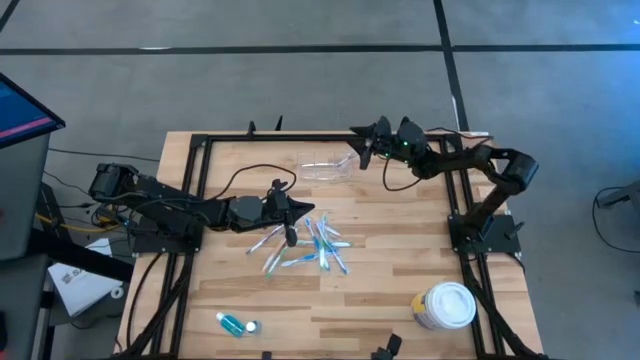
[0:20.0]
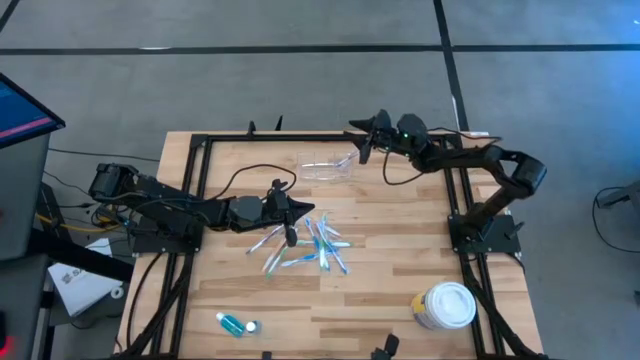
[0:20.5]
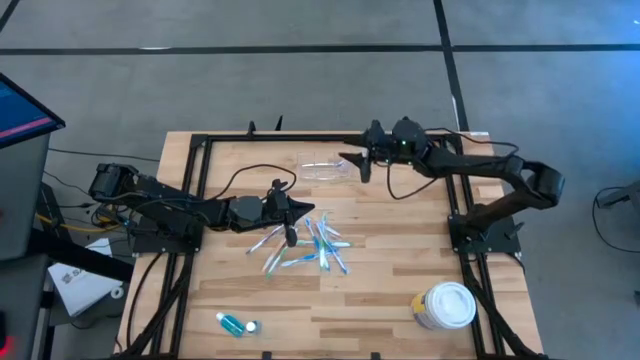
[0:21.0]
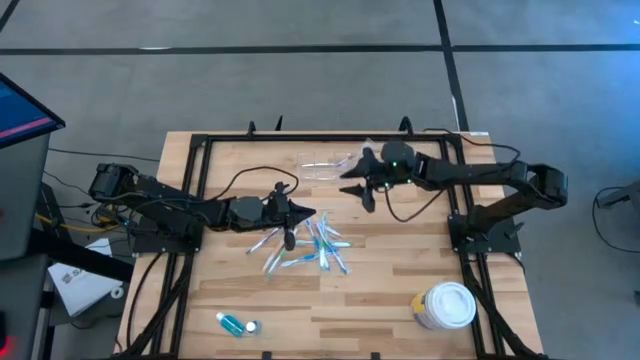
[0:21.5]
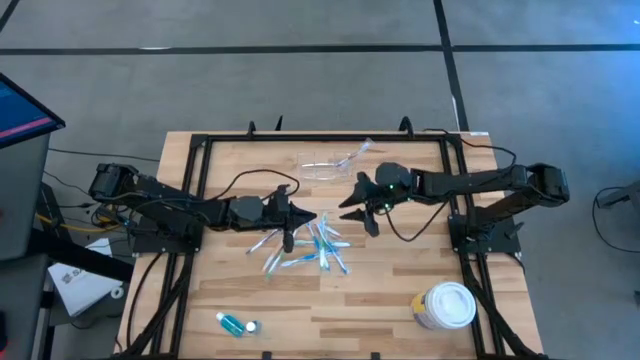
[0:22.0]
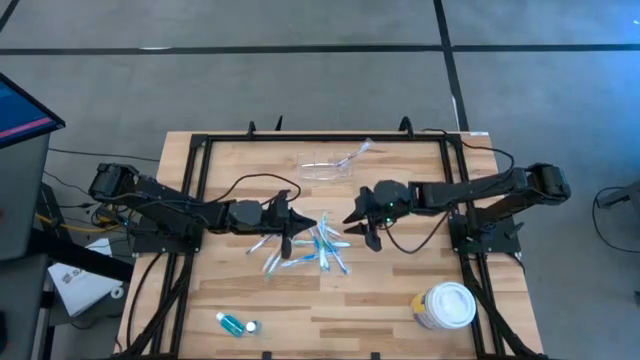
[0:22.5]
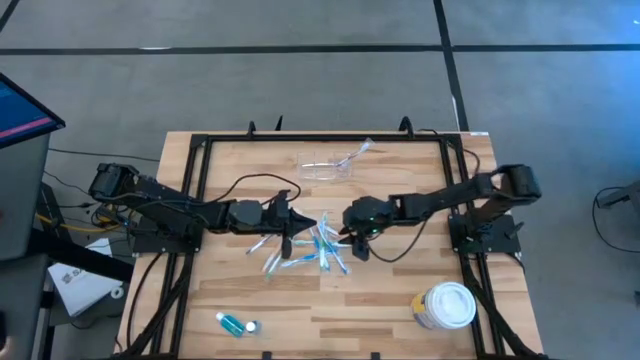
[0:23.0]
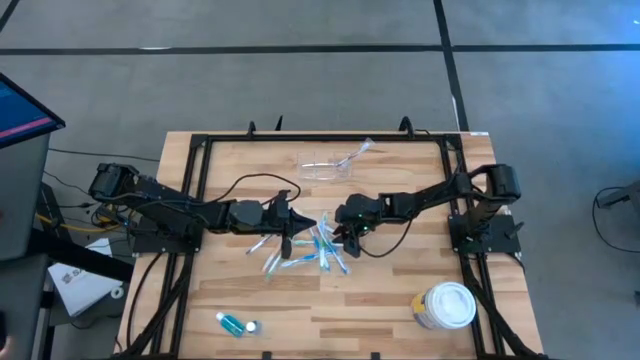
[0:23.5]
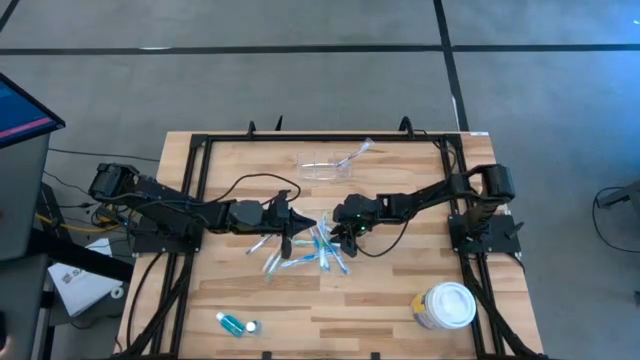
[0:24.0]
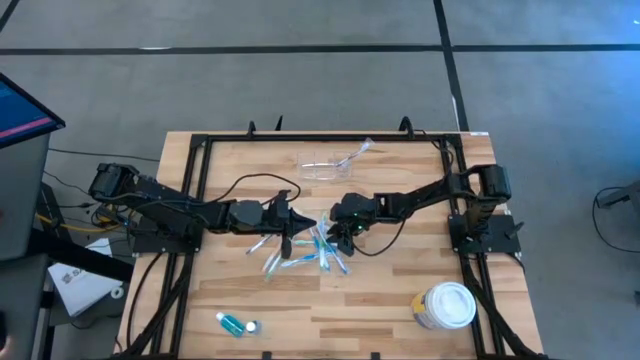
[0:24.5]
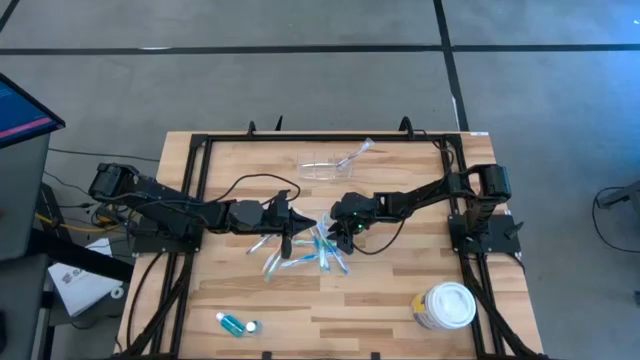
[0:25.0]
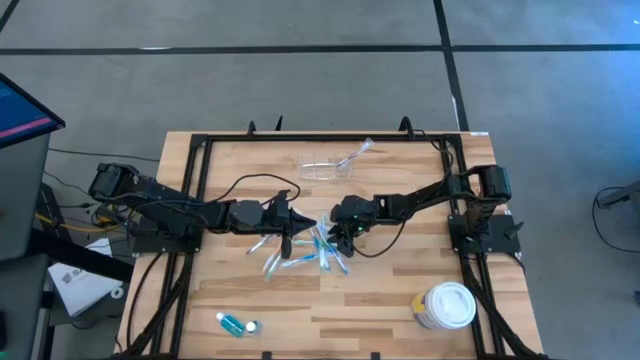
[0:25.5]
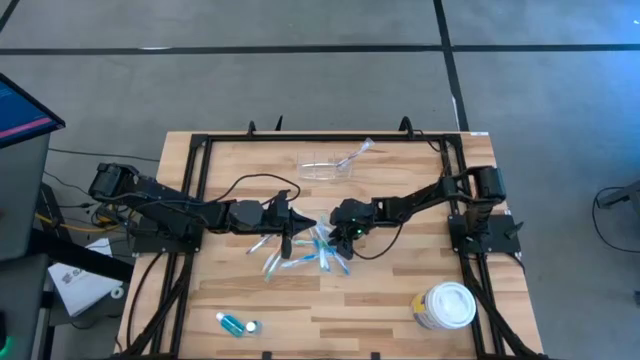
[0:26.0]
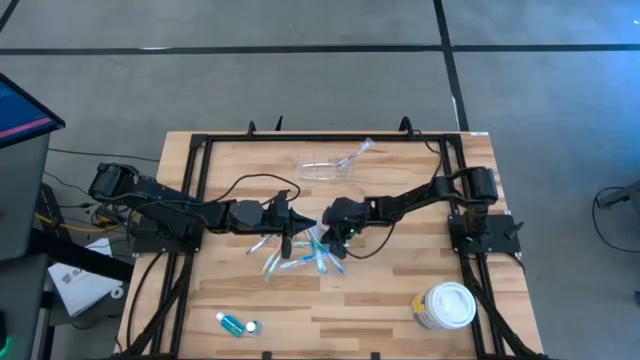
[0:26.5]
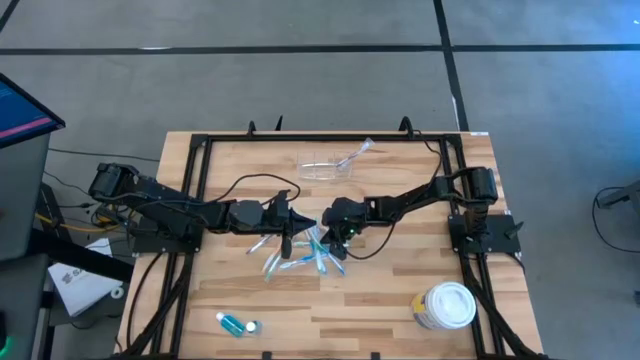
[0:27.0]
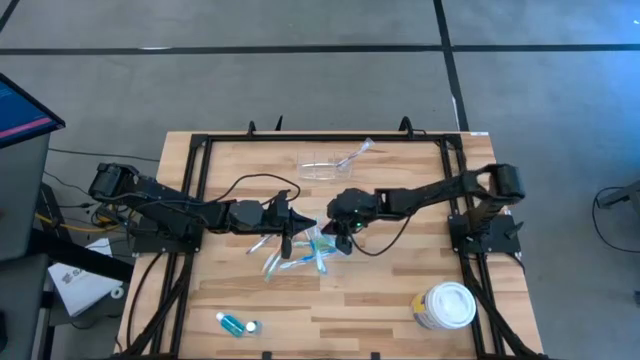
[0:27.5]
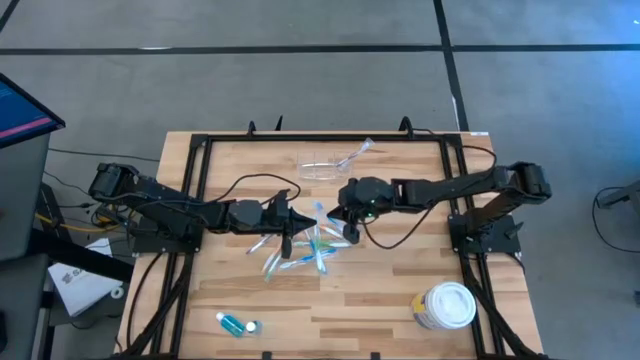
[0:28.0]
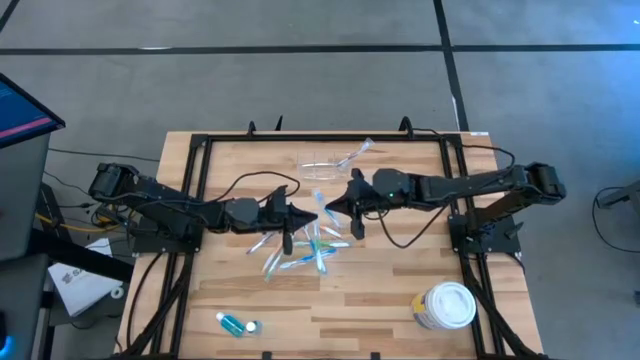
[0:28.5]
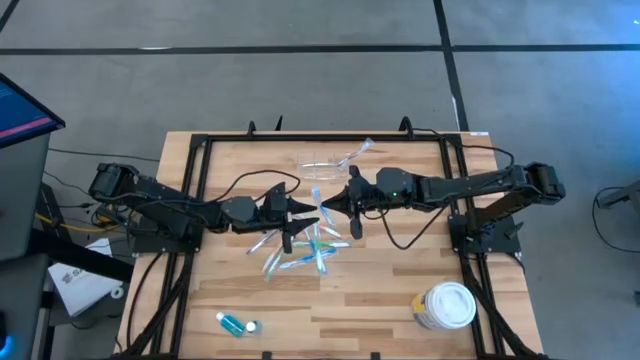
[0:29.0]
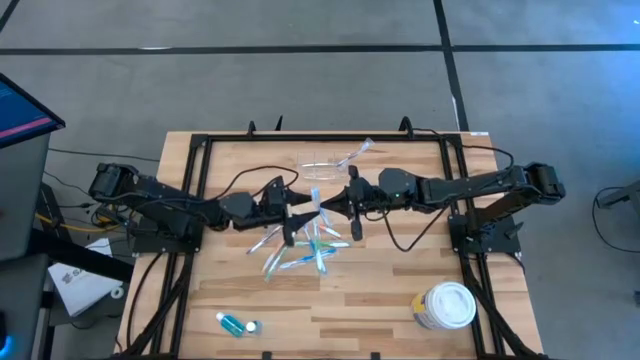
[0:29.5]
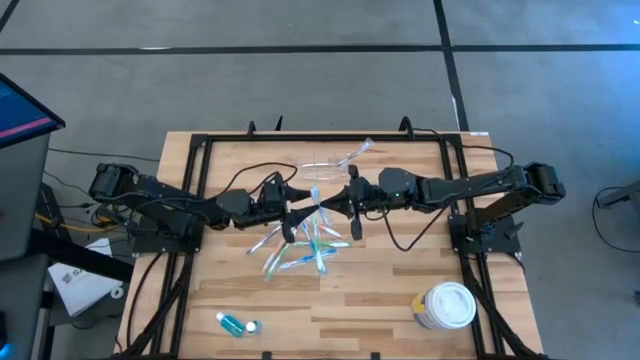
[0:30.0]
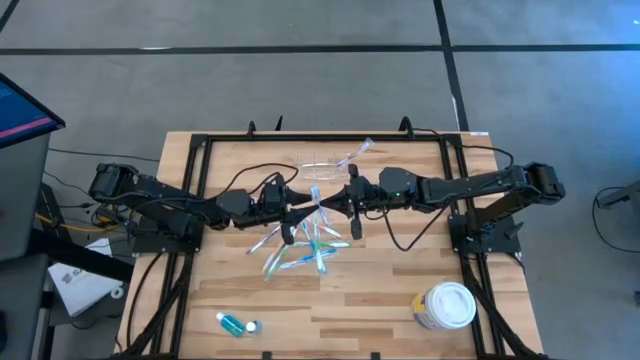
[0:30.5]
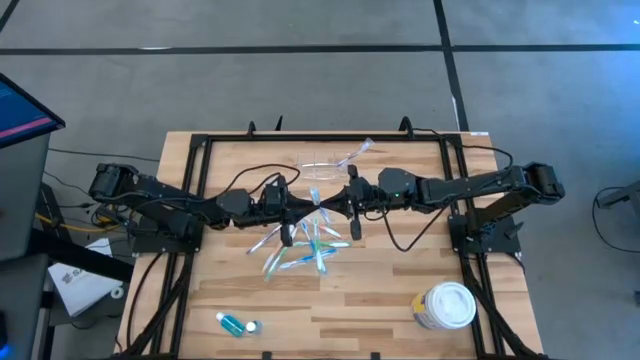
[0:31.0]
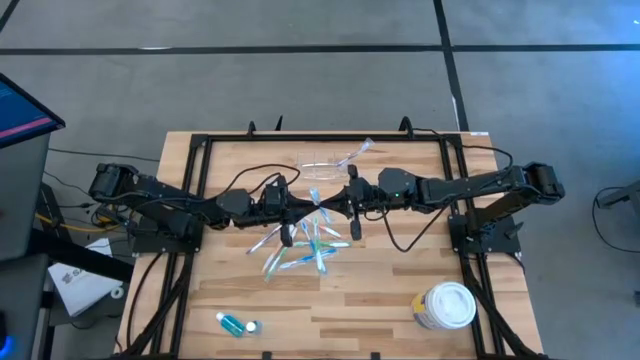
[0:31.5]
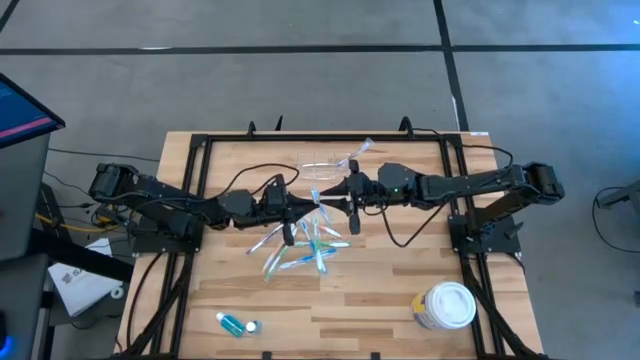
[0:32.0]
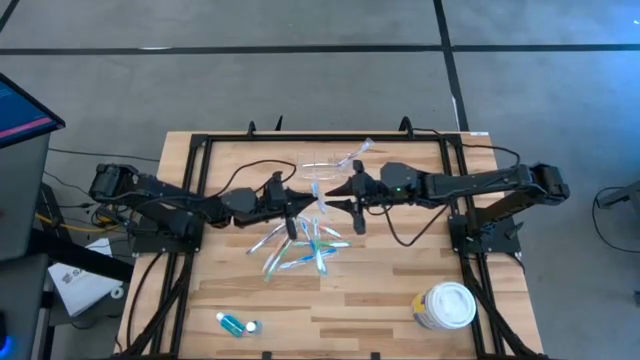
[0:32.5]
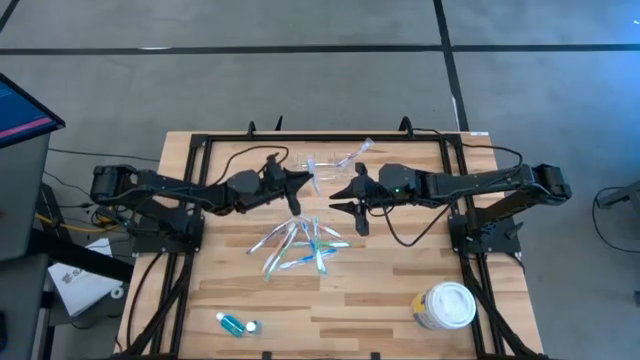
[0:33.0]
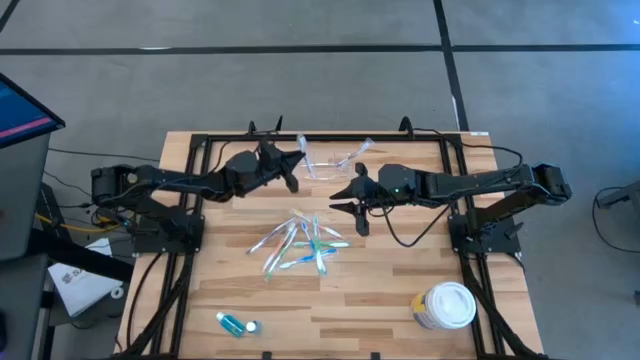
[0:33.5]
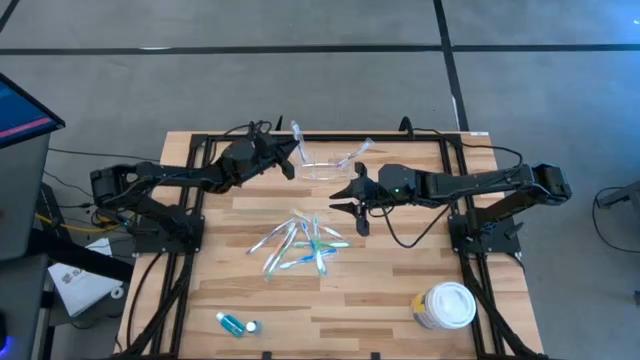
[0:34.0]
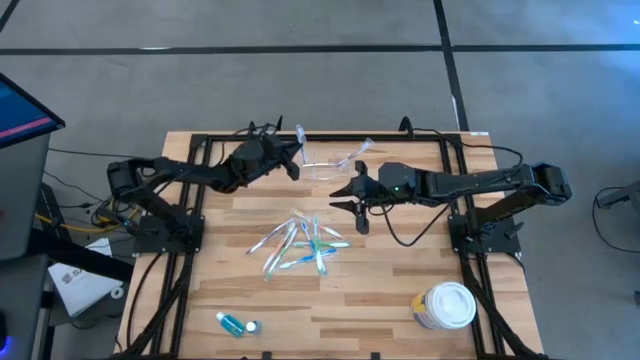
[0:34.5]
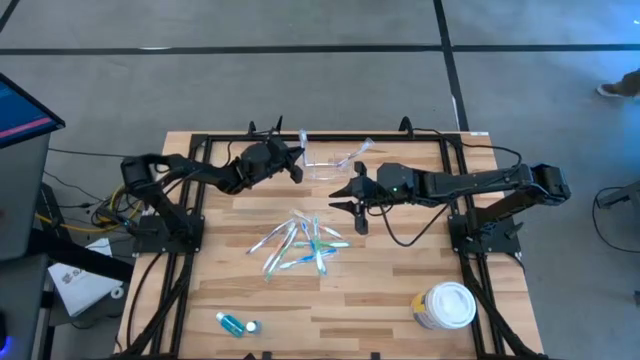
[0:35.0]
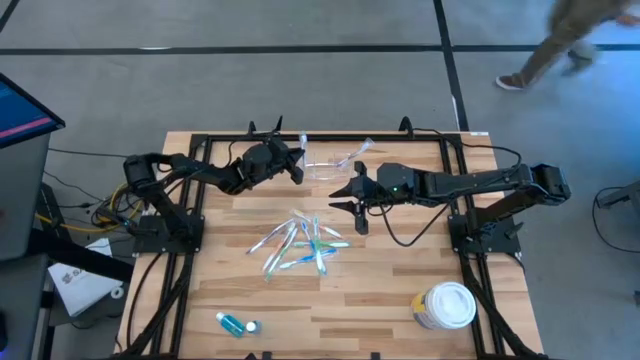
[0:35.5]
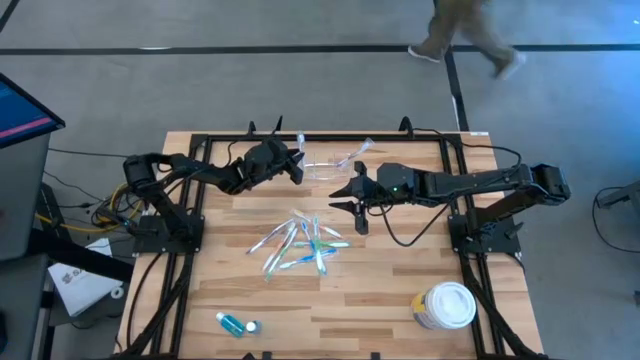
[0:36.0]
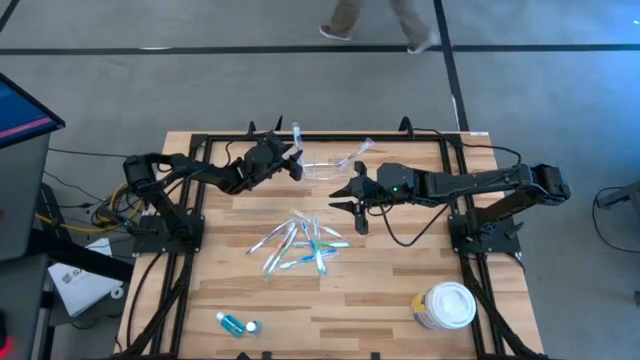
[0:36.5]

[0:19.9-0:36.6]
Task: Pick & Place toothbrushing station
Put the blue toothbrush into the transparent organizer
